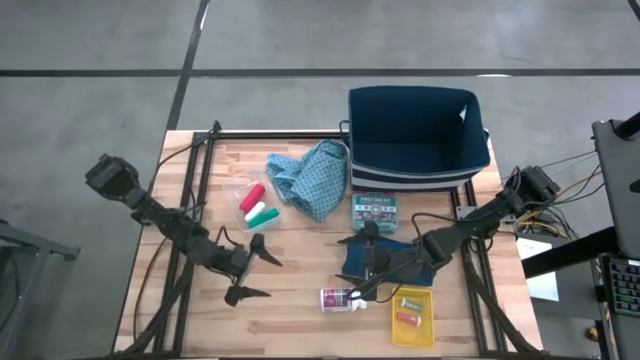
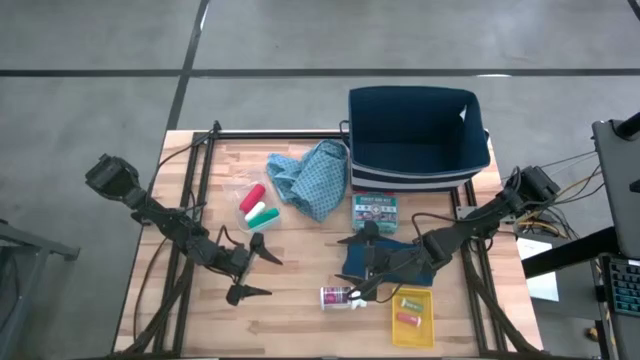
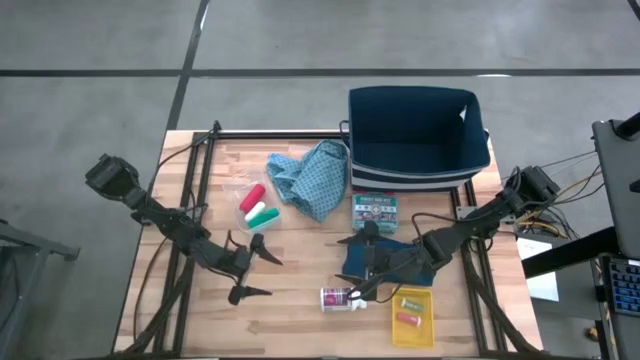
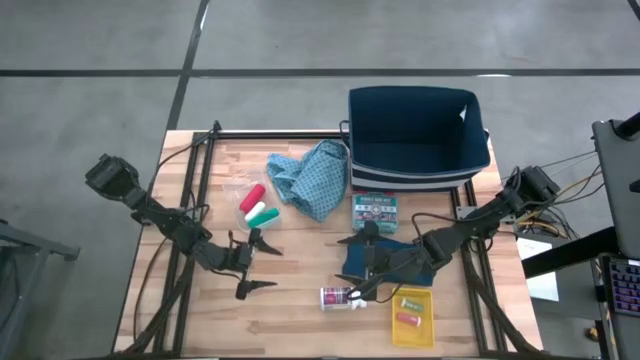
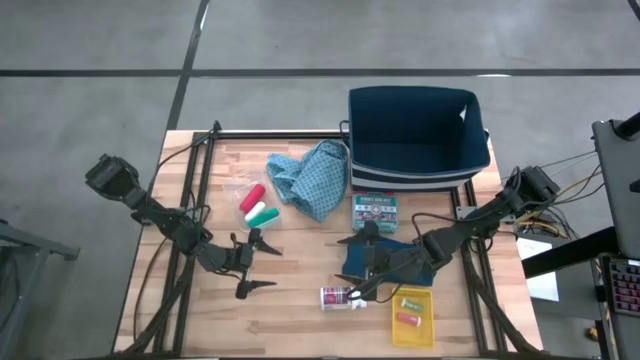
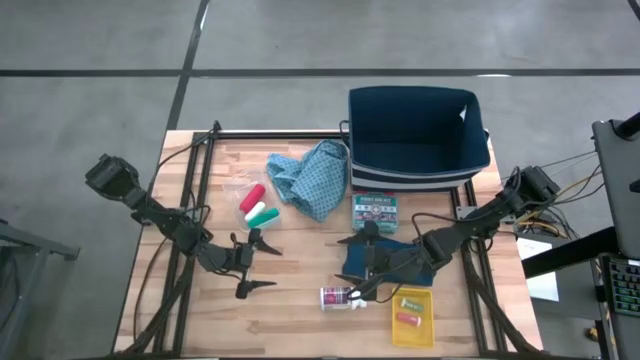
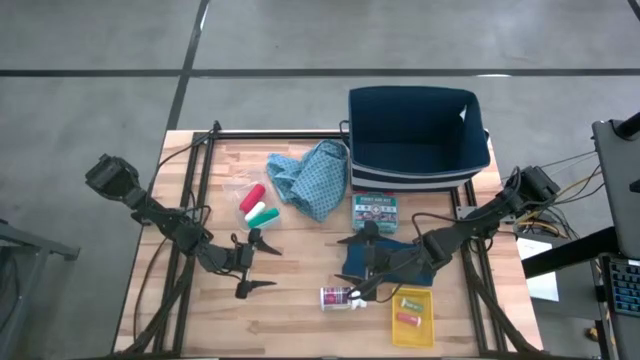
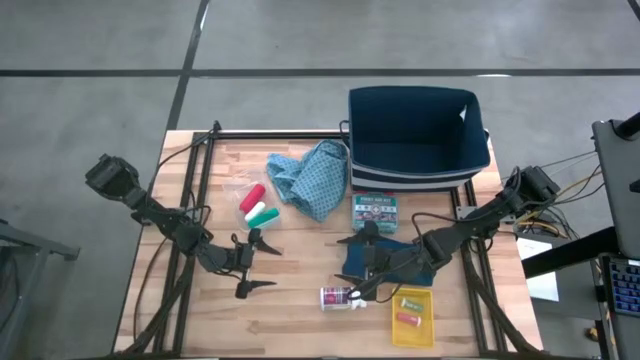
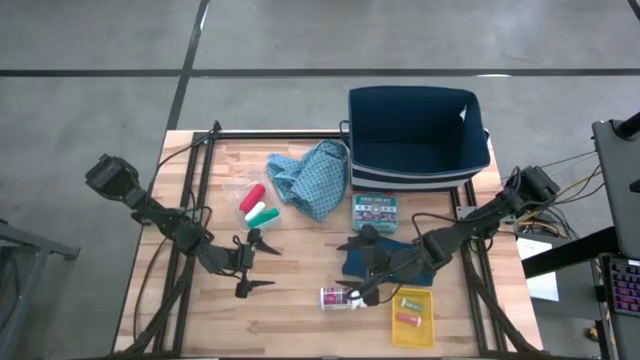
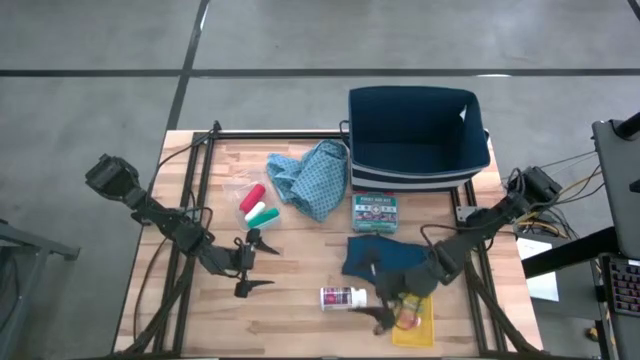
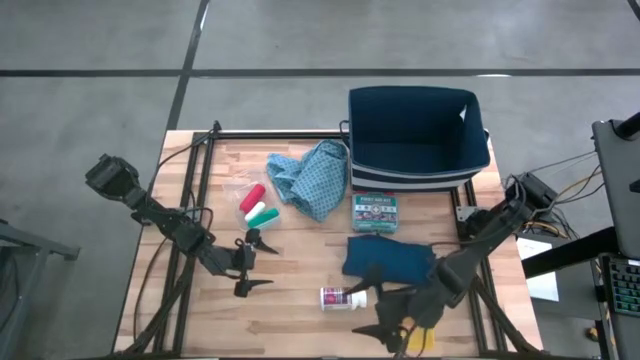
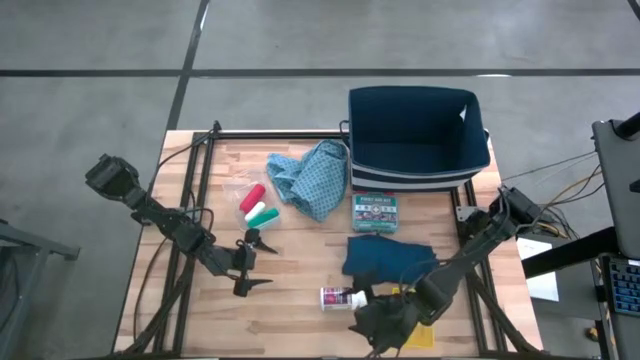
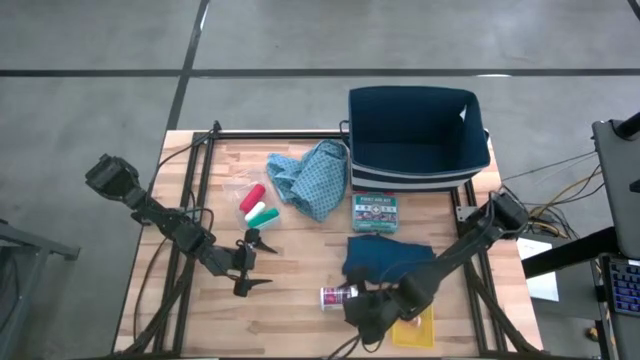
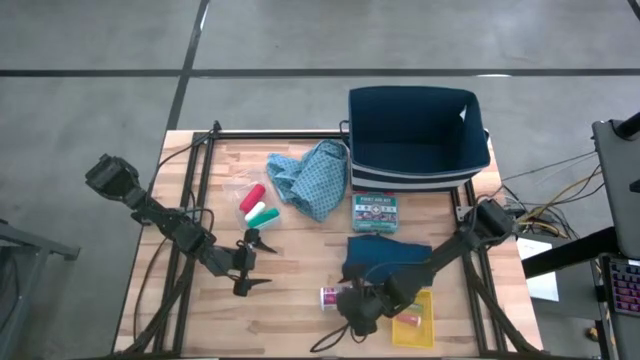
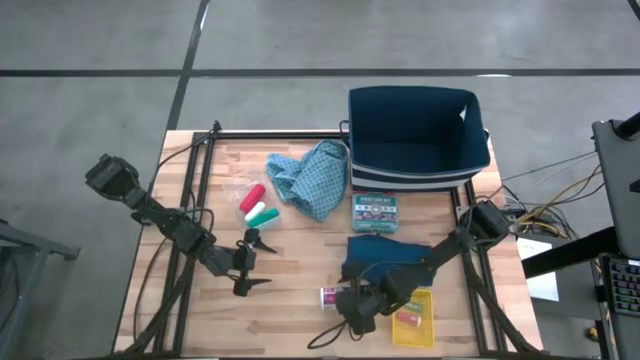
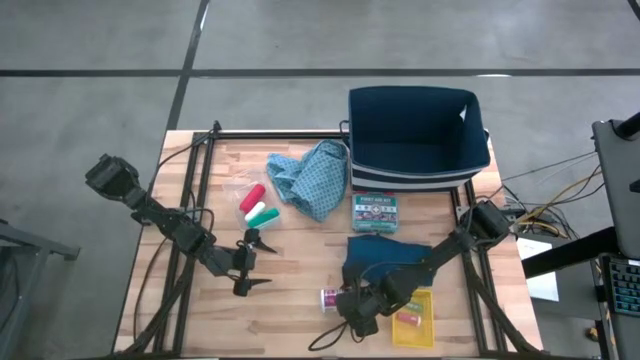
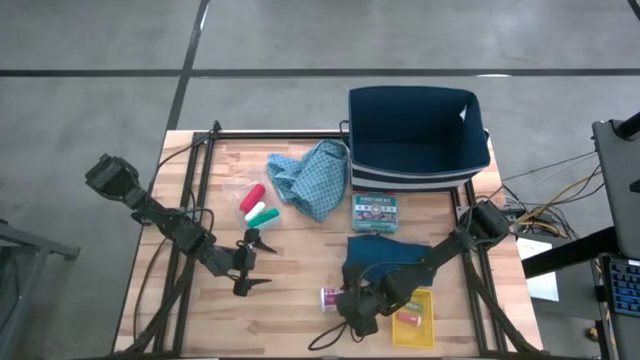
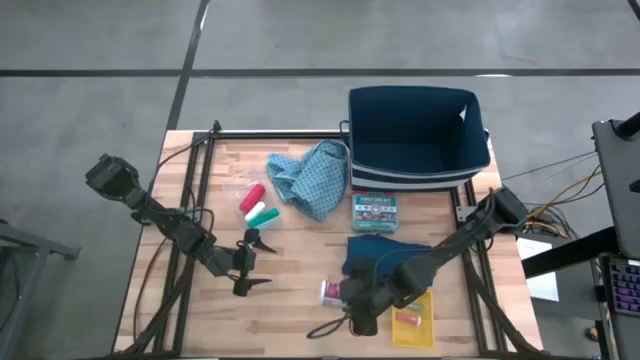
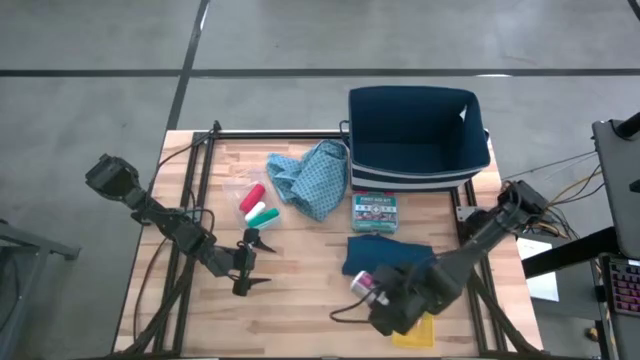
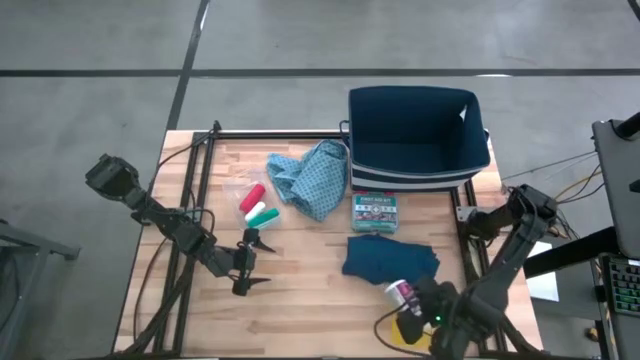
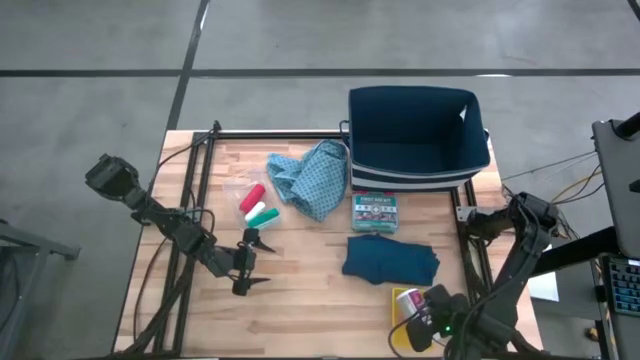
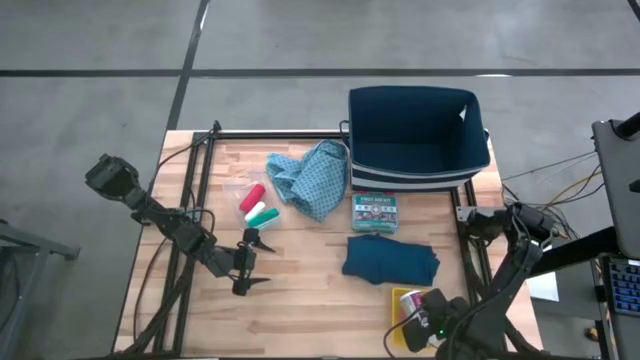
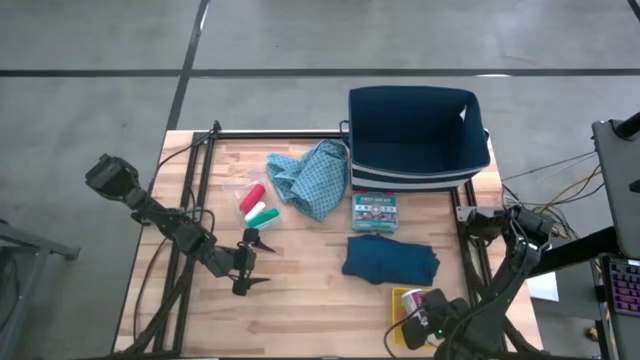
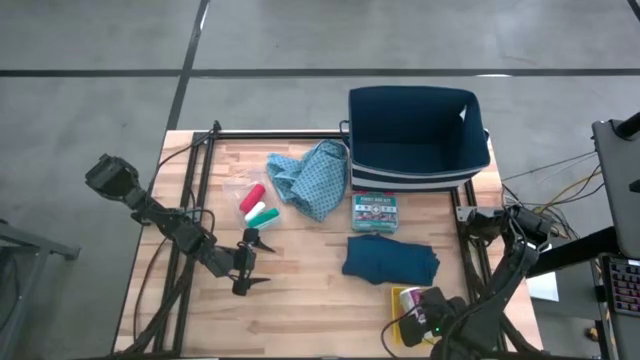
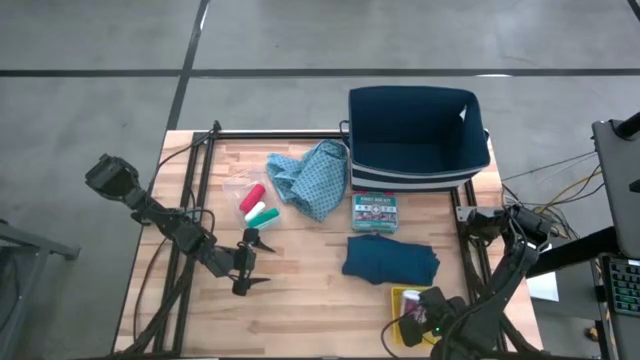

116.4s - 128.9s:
Task: Pick & place medical supplies in basket/bin
Put the white pill bottle into the yellow bin

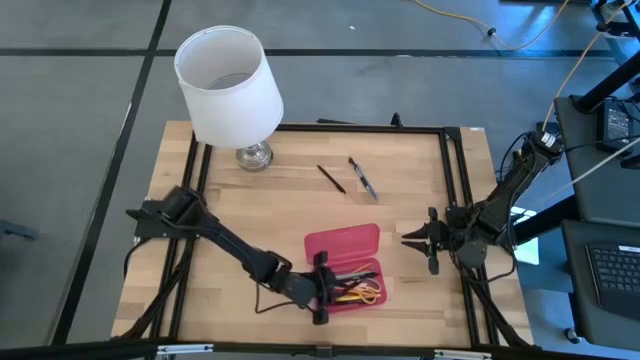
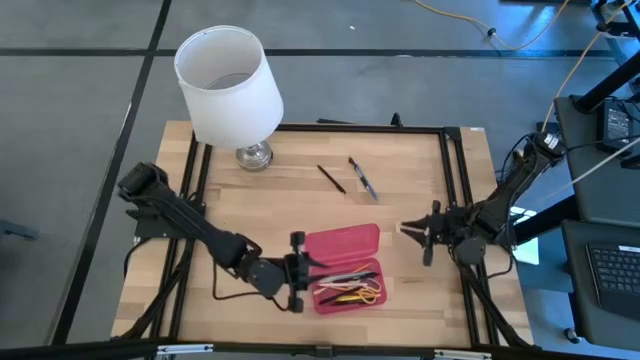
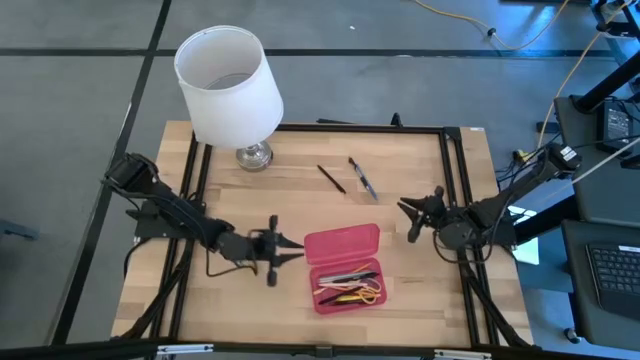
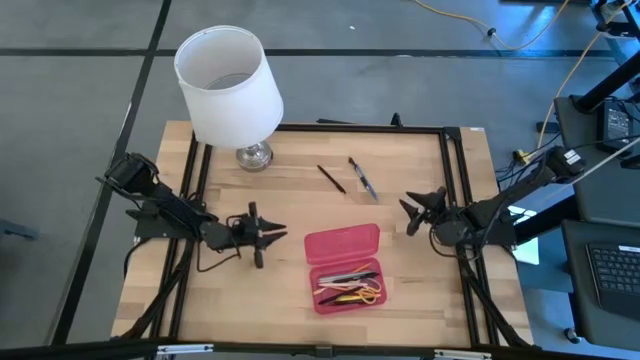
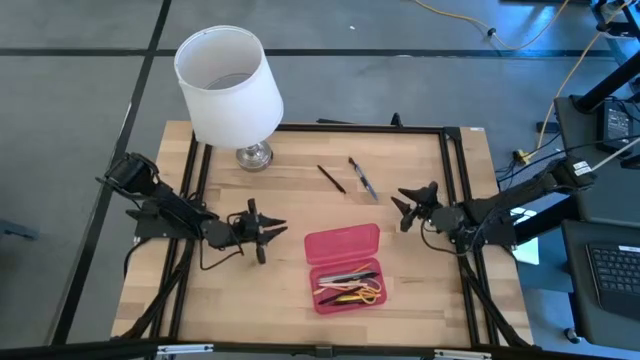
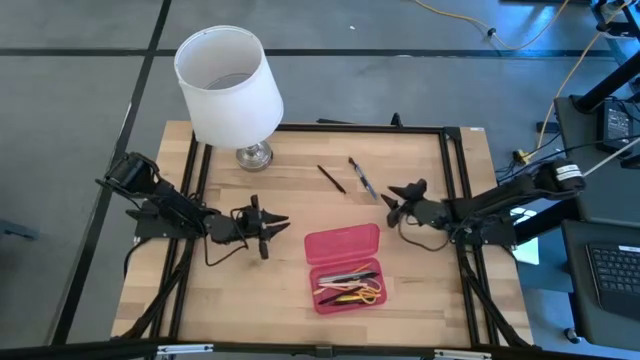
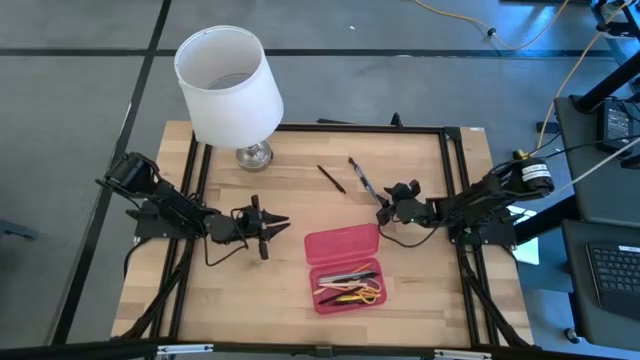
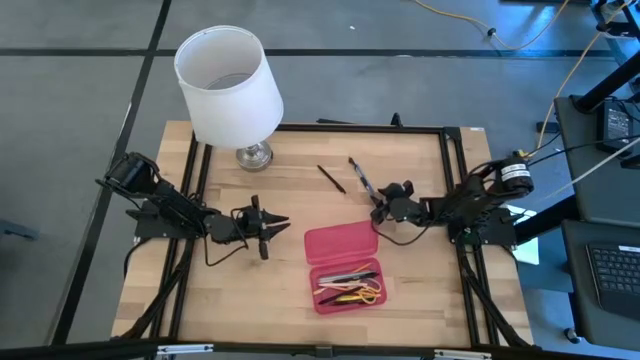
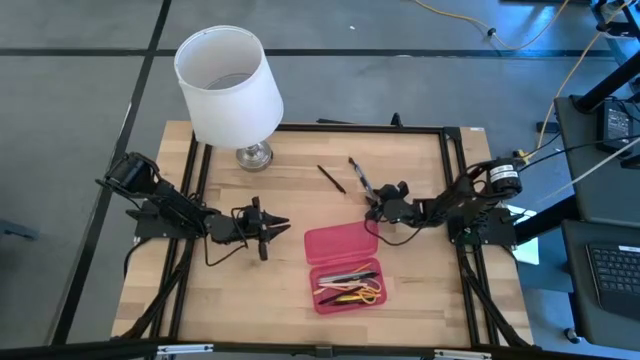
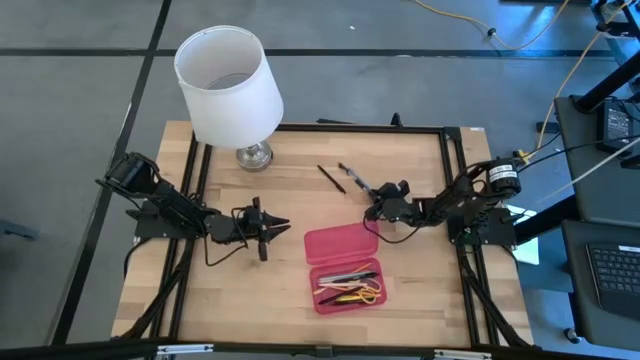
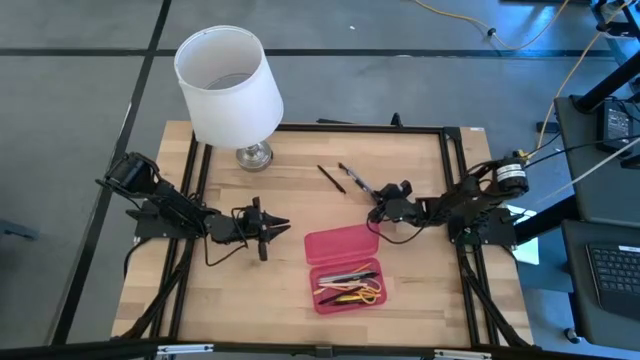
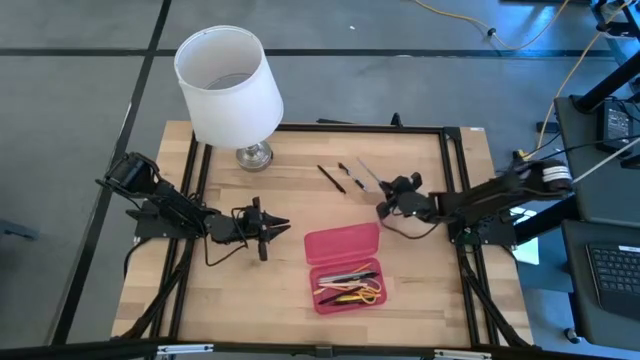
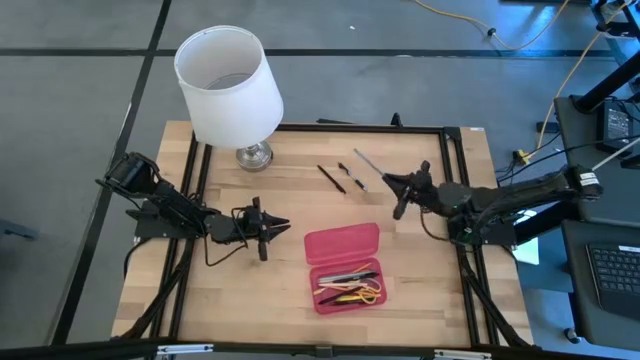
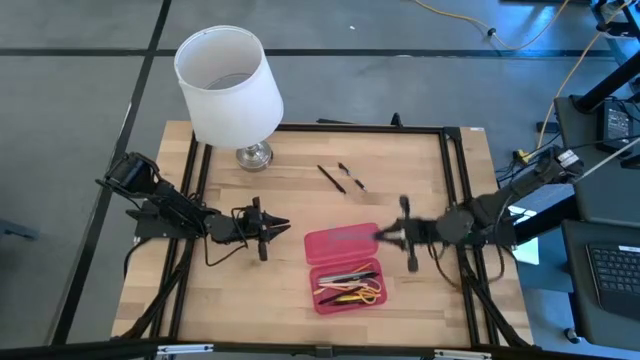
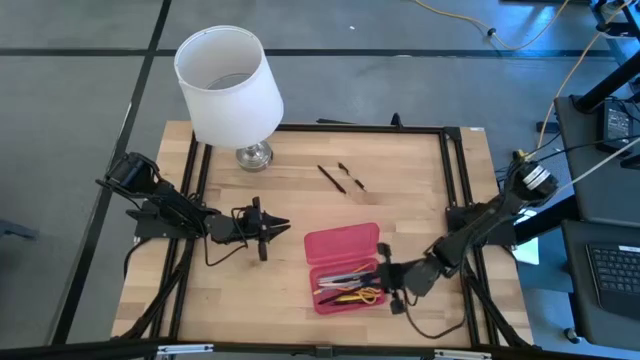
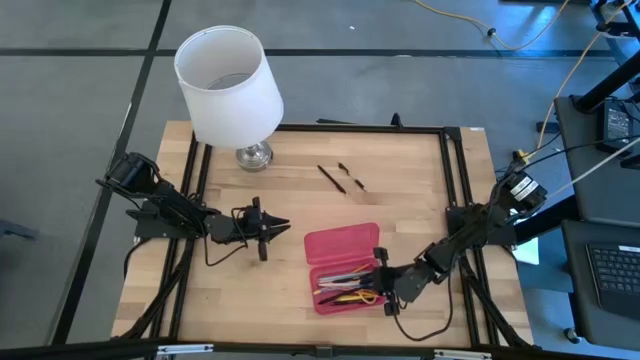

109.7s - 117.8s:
Task: Pick & place school supplies into a supply box
Put the blue pen into the pink supply box
